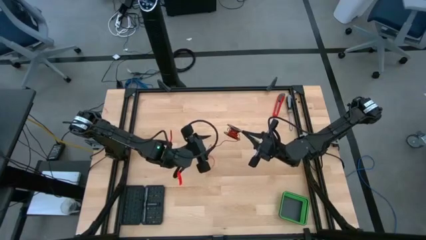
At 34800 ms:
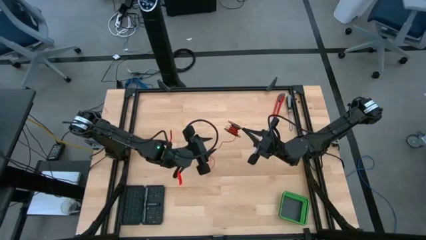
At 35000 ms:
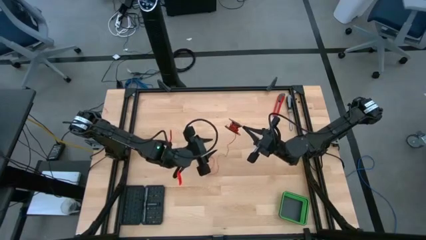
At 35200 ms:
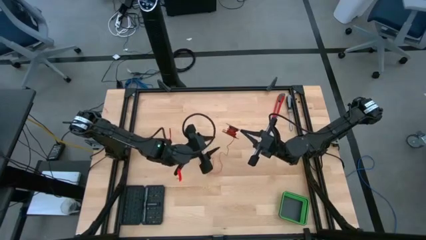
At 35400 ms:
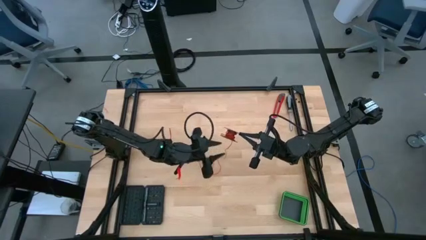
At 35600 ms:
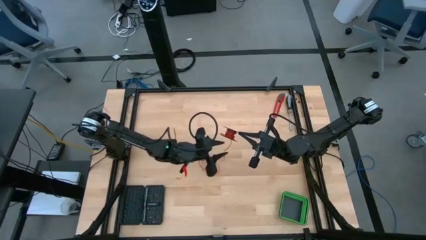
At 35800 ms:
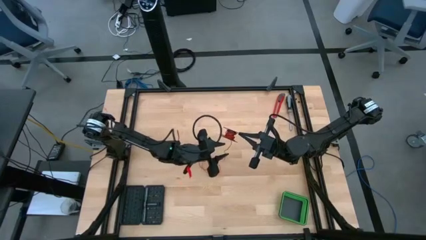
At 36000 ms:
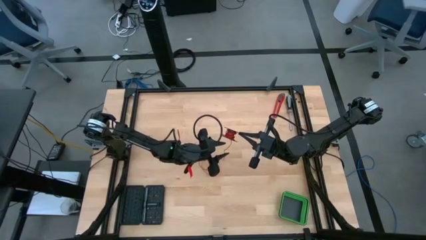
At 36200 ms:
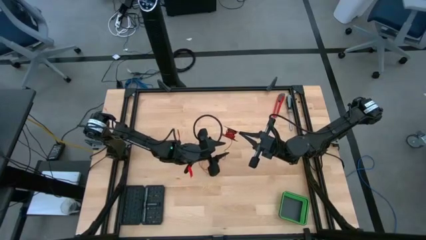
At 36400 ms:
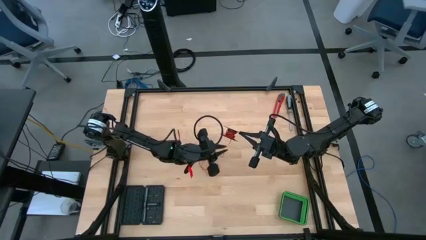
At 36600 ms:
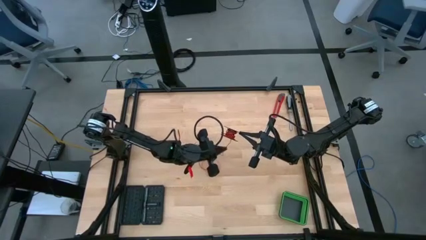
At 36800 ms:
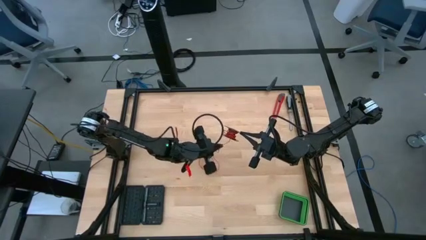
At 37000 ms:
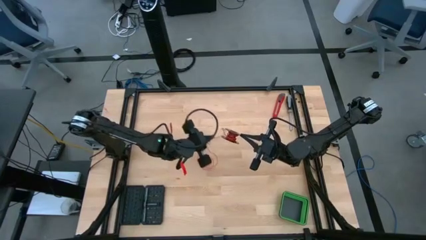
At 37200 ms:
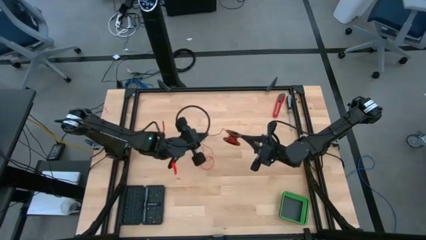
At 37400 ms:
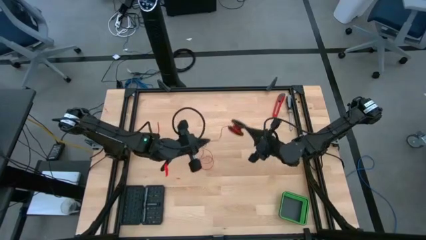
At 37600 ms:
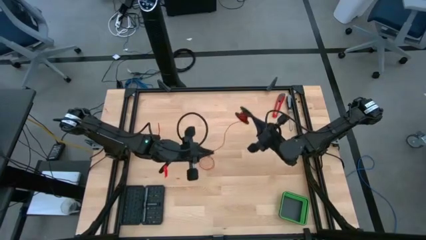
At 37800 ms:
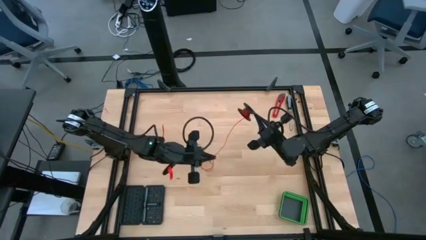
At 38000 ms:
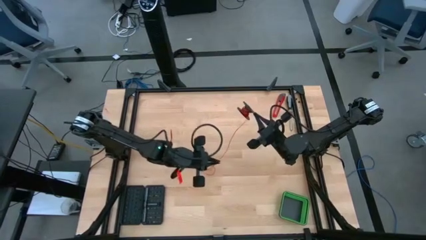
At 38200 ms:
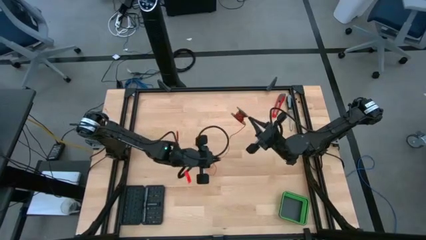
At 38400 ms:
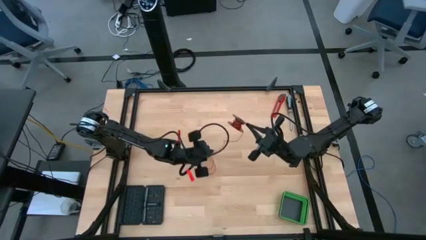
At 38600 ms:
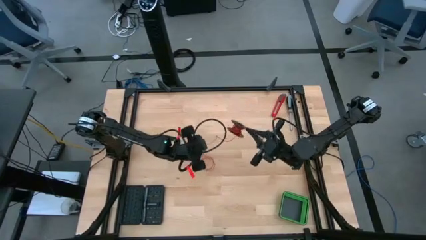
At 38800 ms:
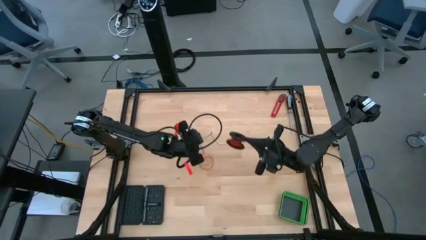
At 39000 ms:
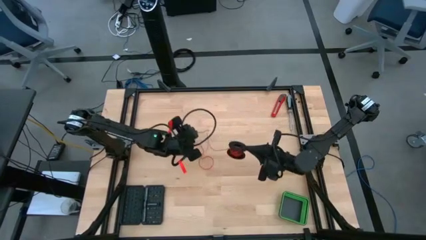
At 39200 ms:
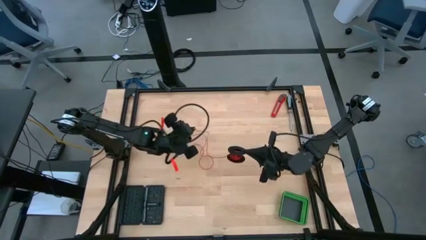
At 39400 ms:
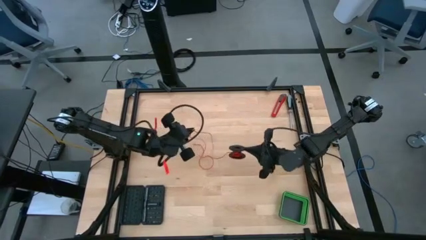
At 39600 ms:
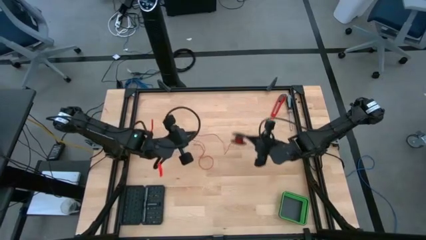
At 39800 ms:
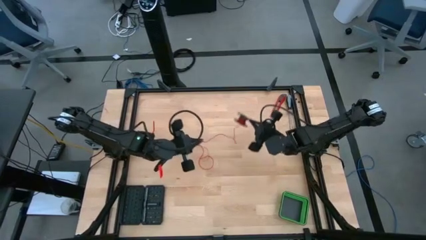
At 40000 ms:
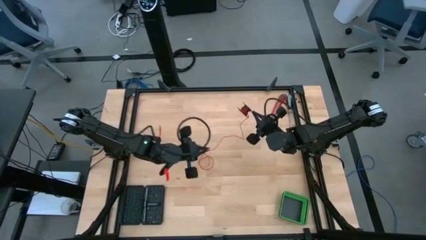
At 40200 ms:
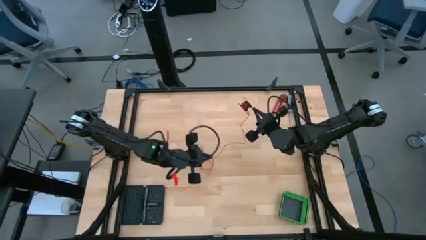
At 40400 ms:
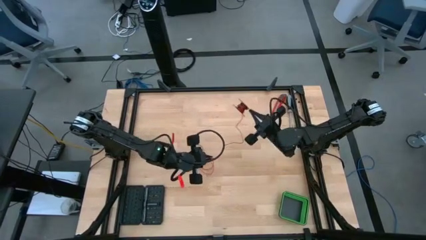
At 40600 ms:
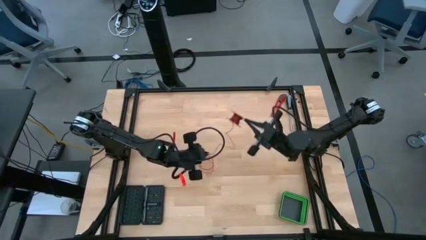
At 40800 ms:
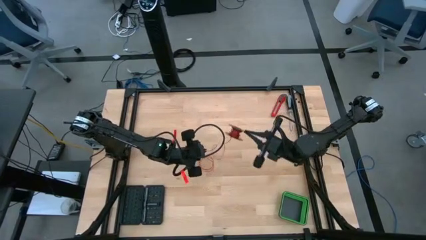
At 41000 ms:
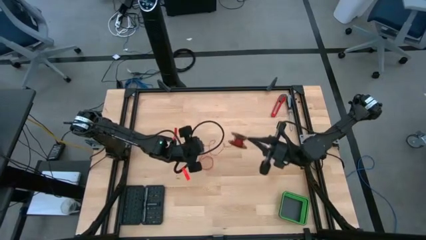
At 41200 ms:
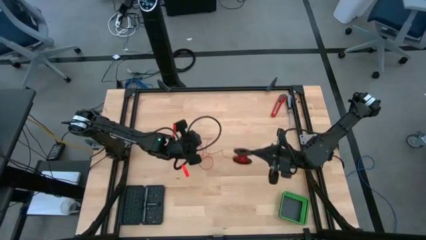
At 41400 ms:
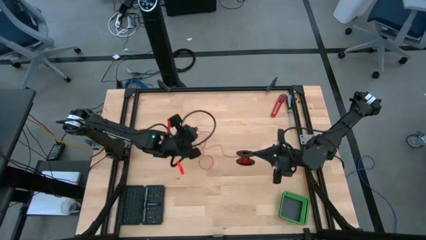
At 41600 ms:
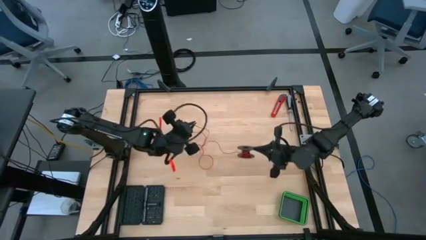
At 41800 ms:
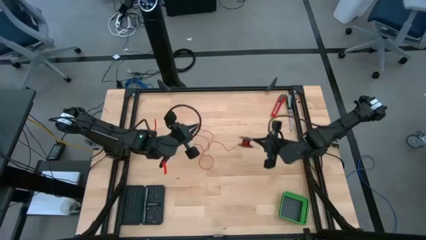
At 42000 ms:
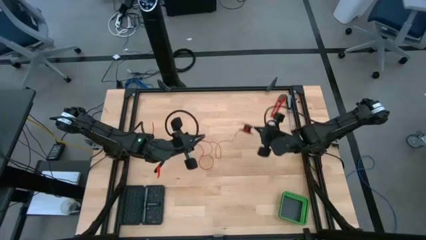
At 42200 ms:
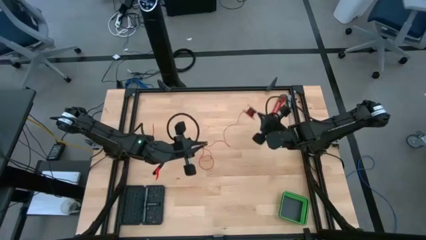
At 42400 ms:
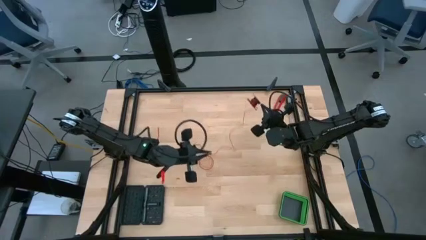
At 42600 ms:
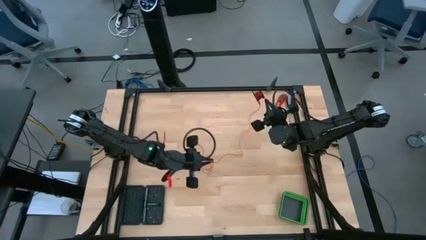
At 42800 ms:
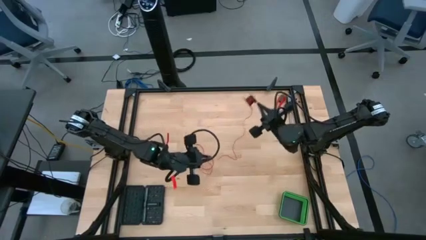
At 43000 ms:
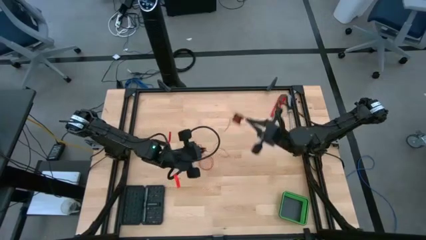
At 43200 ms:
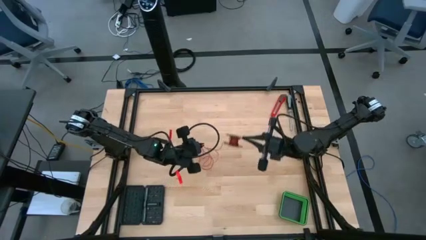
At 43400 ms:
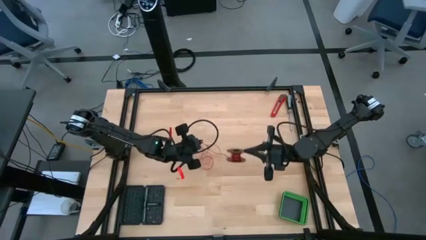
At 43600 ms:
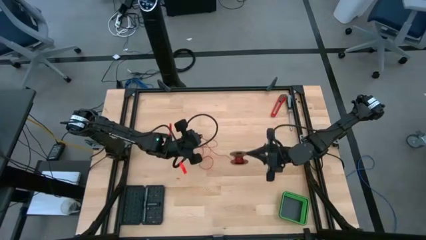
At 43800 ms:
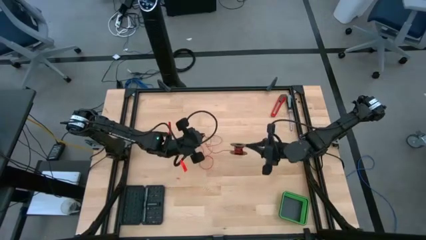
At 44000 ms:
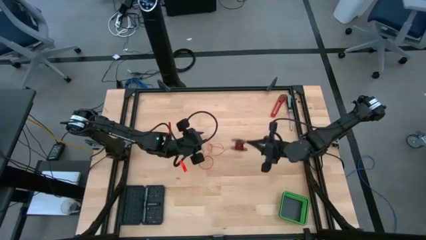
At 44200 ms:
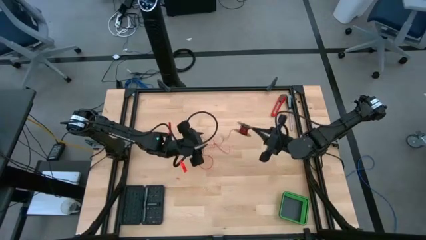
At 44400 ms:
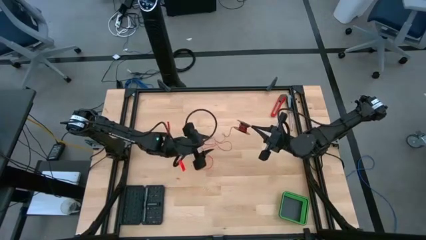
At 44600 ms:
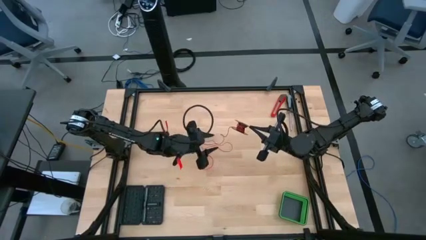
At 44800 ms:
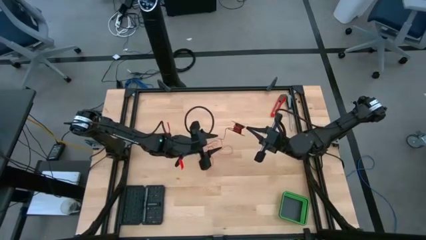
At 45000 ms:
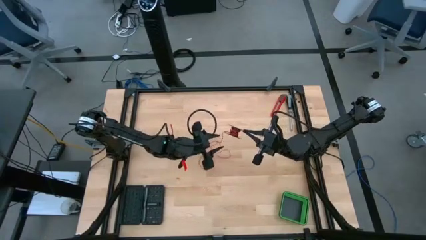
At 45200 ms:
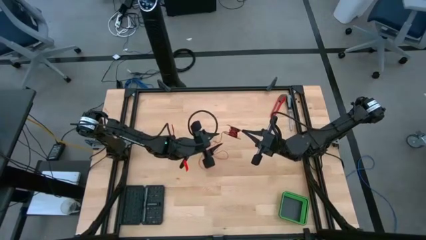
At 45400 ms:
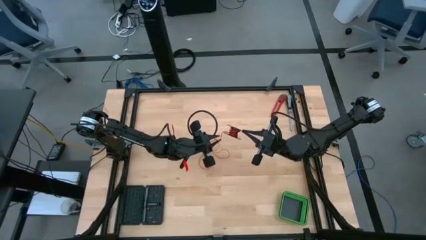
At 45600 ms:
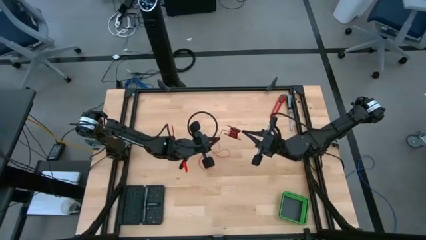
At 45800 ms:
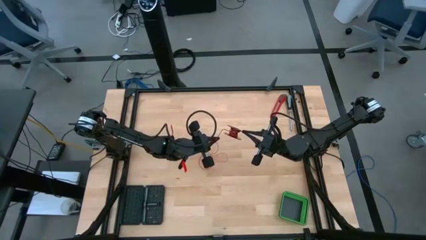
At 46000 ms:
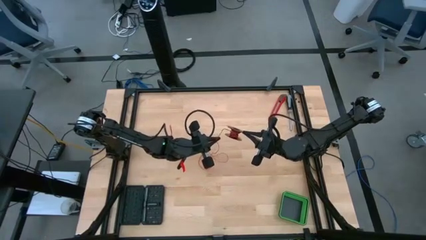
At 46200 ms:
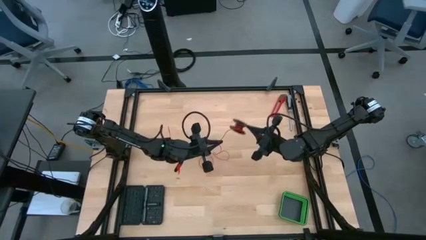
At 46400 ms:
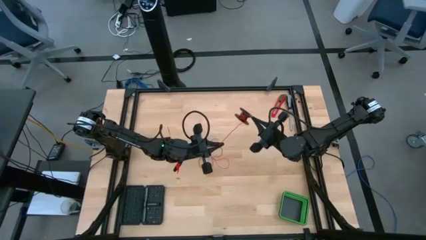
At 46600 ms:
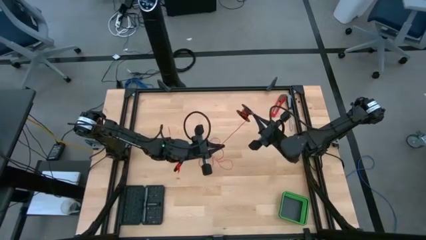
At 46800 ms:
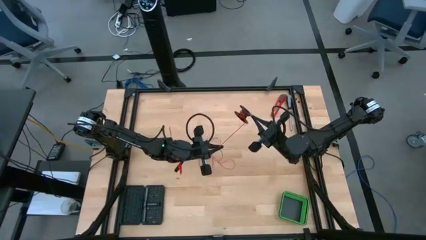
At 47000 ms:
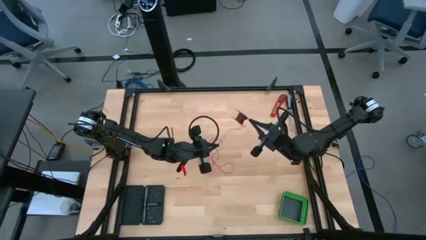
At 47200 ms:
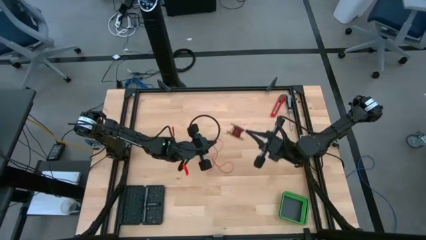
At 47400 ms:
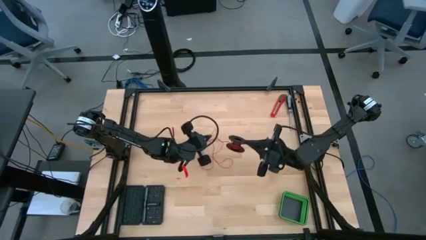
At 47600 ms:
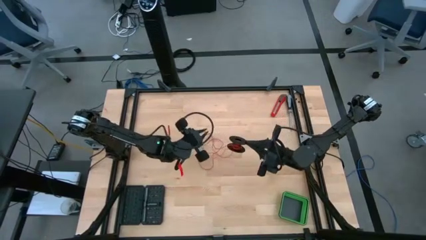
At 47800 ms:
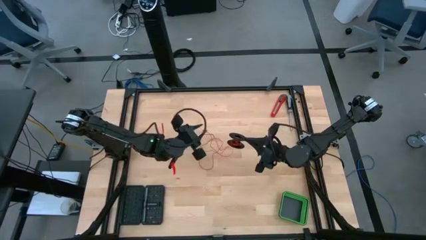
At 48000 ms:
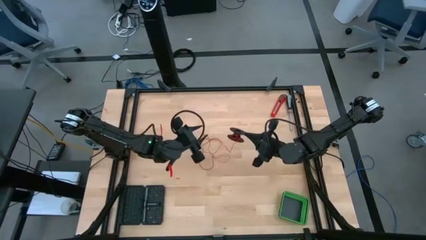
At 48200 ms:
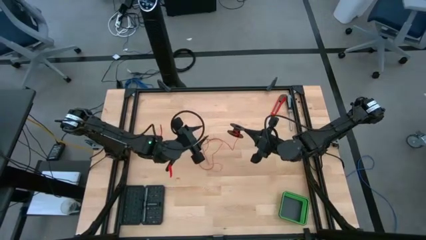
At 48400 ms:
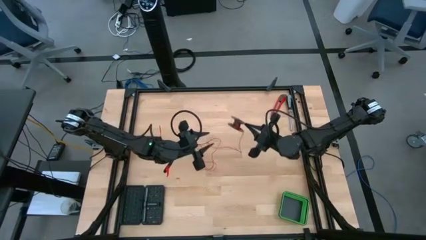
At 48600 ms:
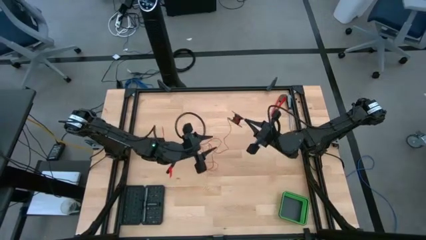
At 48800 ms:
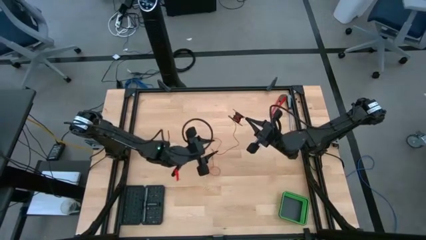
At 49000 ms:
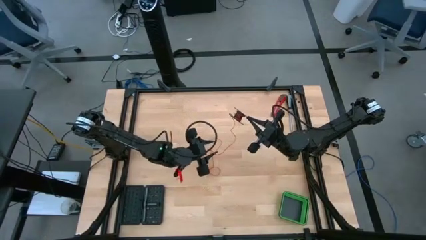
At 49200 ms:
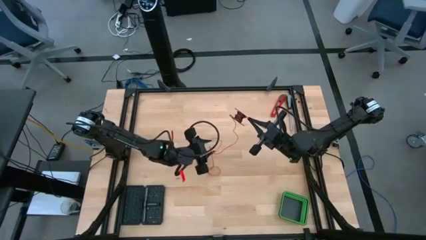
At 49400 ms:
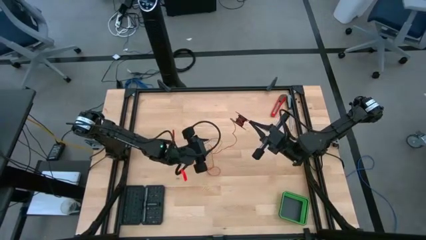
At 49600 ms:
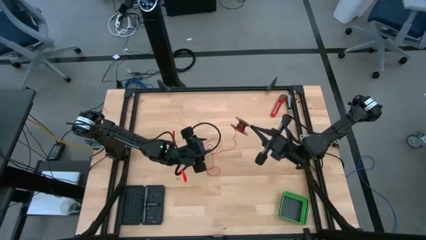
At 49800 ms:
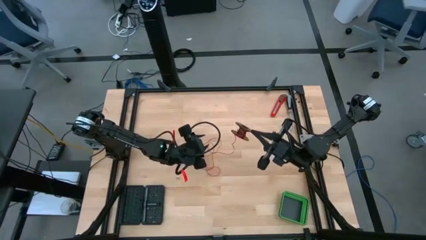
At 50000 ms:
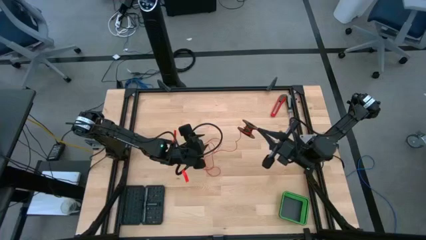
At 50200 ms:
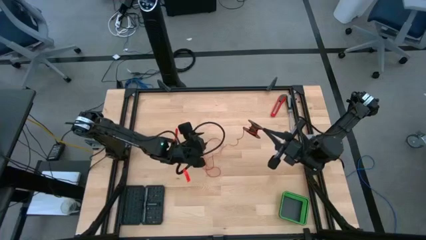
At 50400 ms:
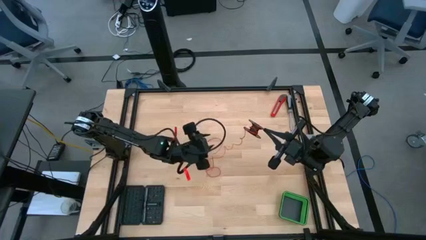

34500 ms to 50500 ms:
Task: Coil cords
Uncoil the red wire from the black spool
